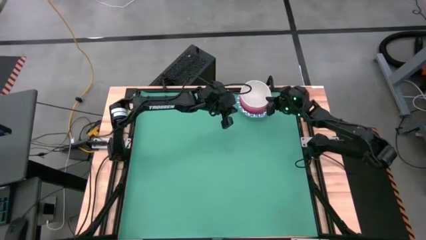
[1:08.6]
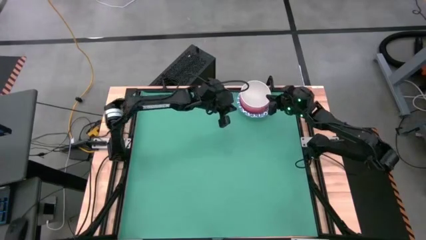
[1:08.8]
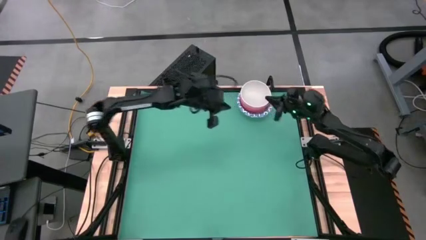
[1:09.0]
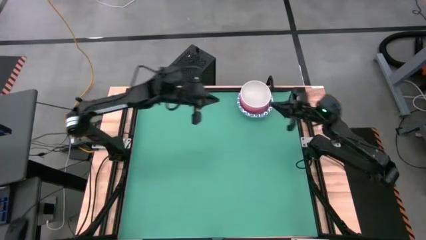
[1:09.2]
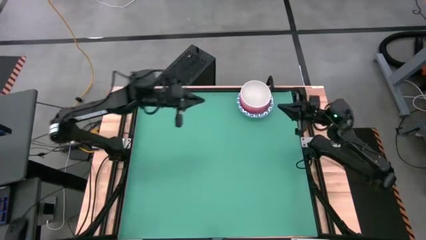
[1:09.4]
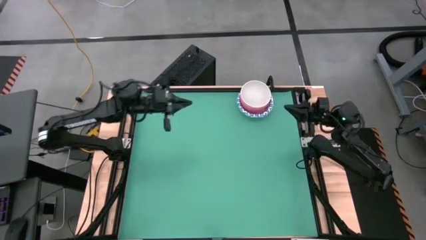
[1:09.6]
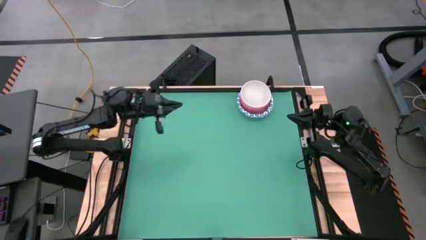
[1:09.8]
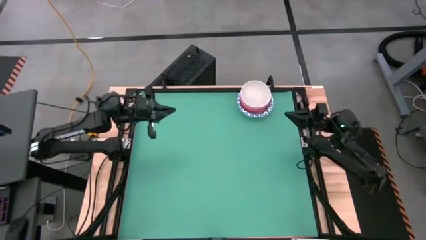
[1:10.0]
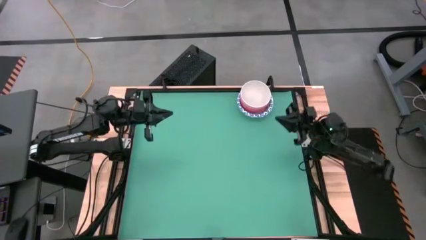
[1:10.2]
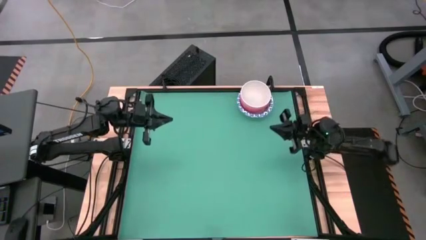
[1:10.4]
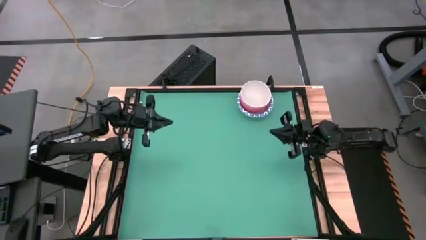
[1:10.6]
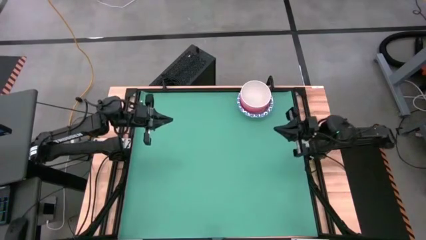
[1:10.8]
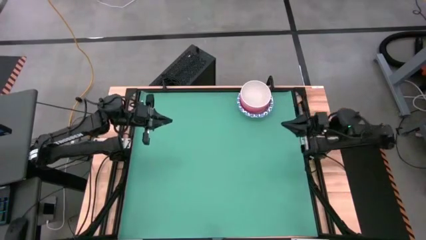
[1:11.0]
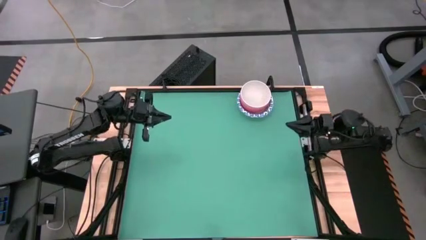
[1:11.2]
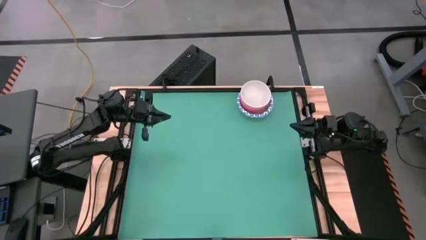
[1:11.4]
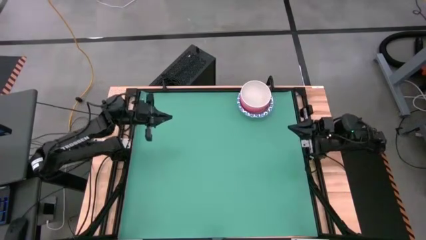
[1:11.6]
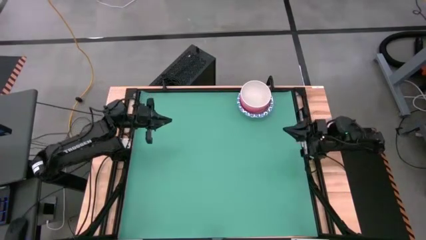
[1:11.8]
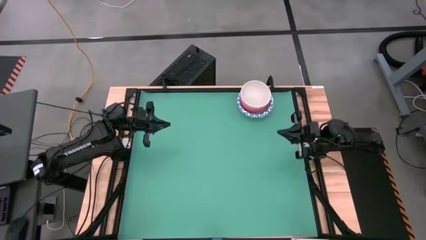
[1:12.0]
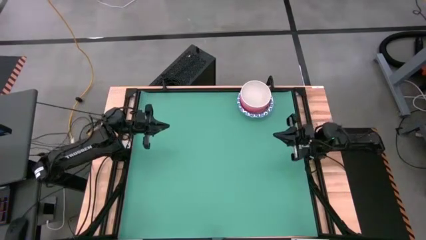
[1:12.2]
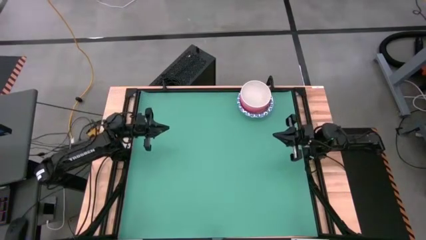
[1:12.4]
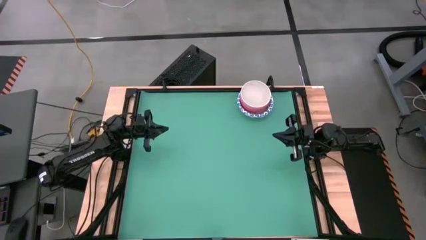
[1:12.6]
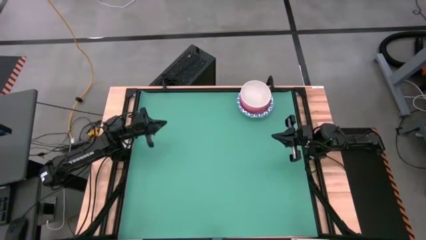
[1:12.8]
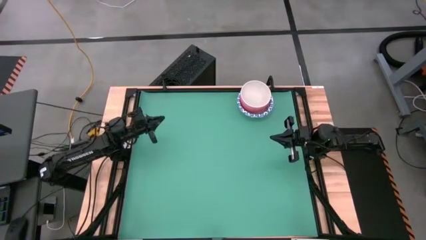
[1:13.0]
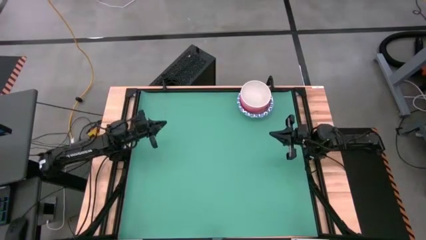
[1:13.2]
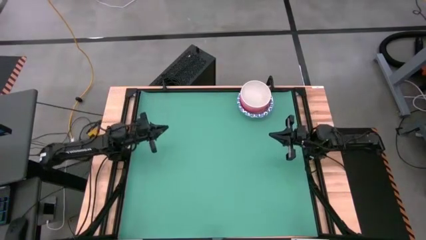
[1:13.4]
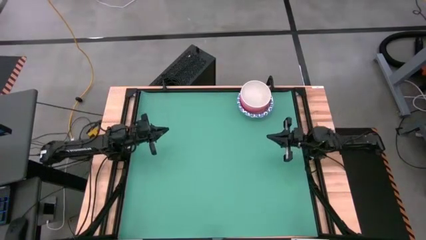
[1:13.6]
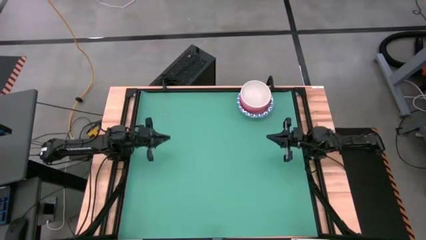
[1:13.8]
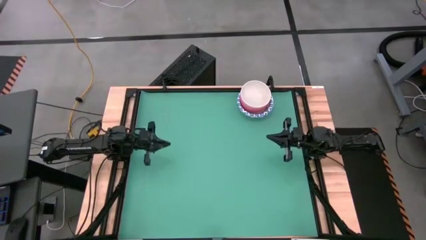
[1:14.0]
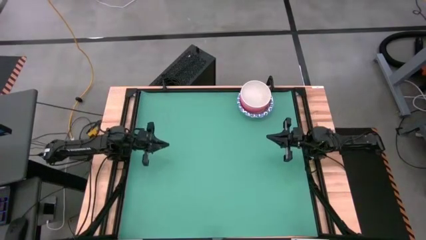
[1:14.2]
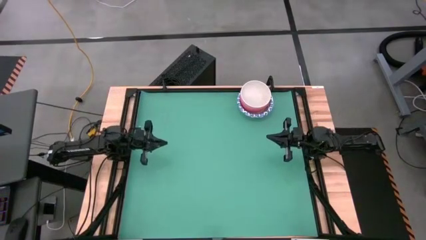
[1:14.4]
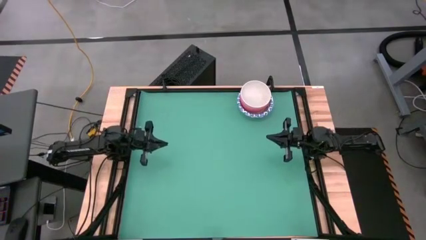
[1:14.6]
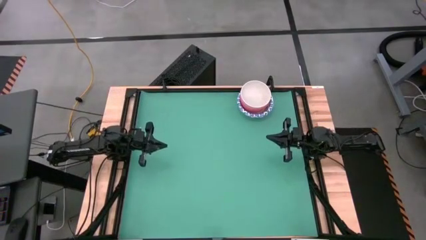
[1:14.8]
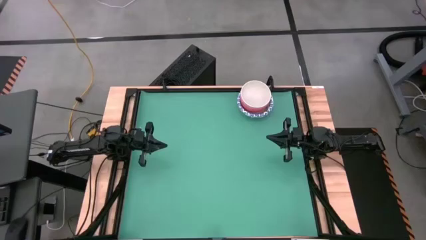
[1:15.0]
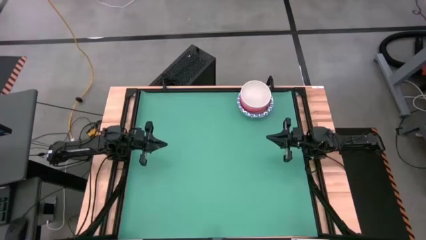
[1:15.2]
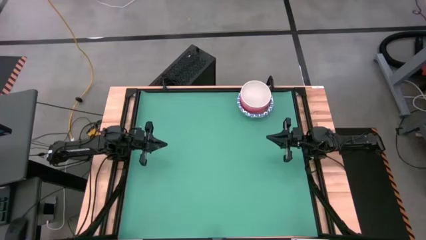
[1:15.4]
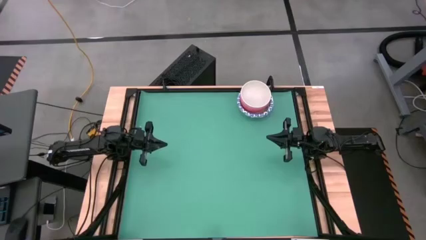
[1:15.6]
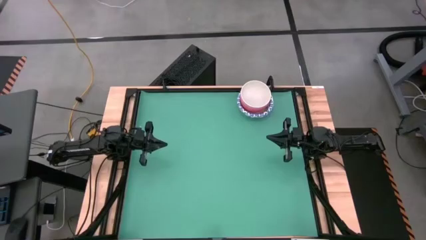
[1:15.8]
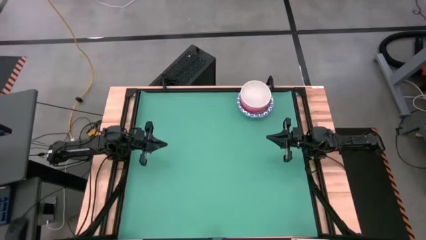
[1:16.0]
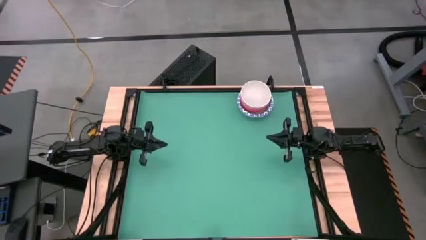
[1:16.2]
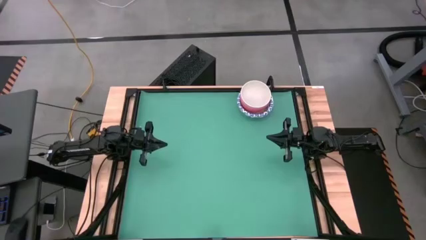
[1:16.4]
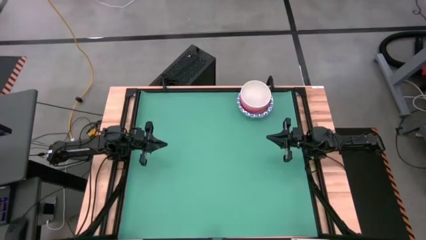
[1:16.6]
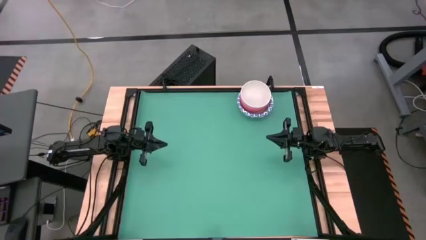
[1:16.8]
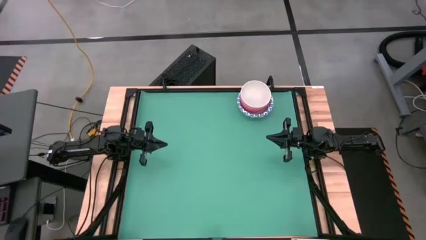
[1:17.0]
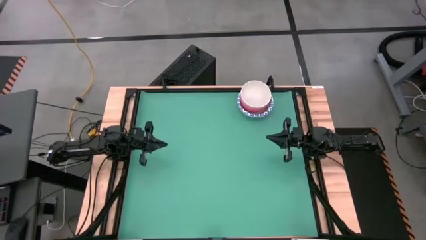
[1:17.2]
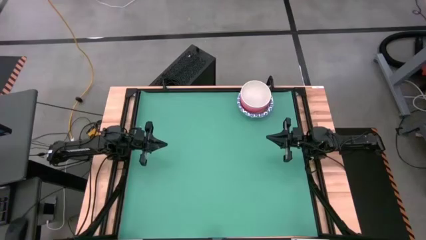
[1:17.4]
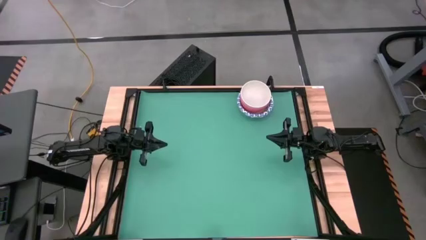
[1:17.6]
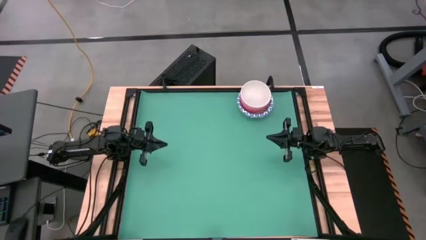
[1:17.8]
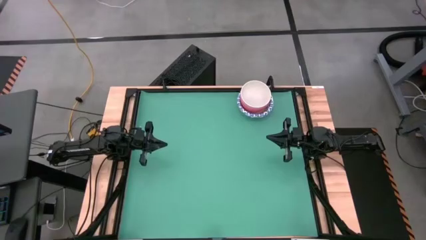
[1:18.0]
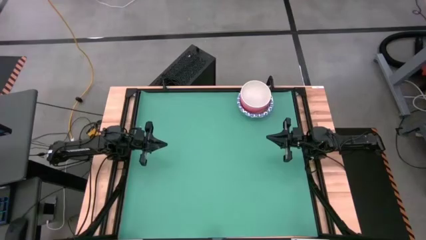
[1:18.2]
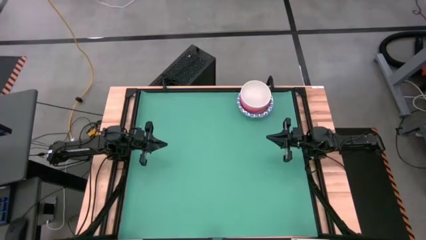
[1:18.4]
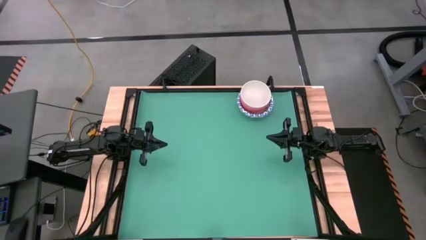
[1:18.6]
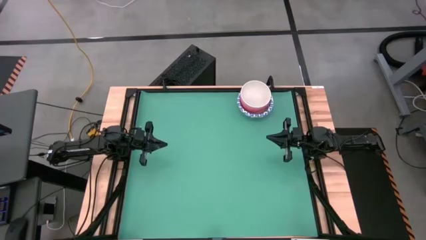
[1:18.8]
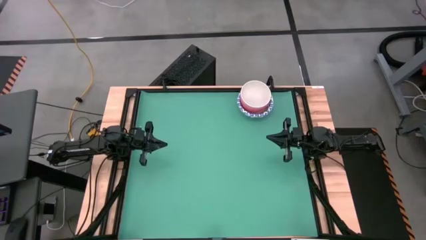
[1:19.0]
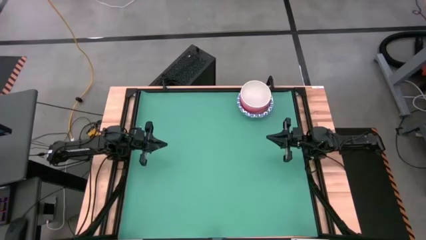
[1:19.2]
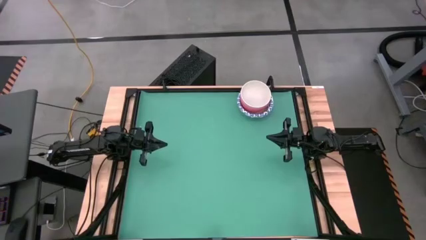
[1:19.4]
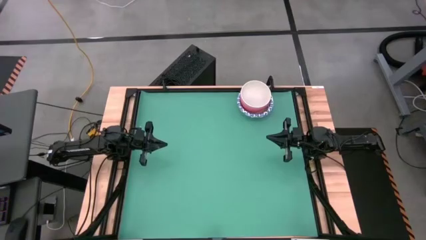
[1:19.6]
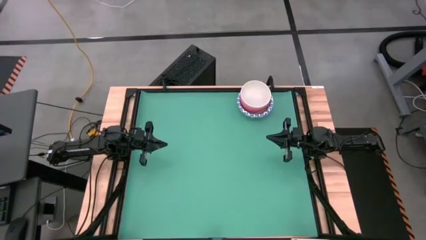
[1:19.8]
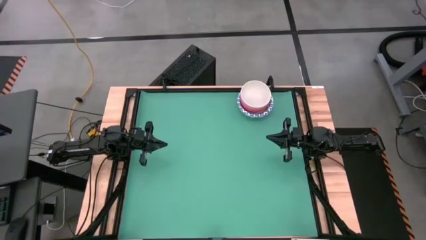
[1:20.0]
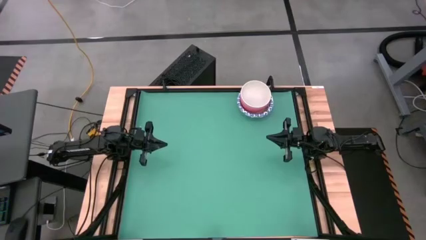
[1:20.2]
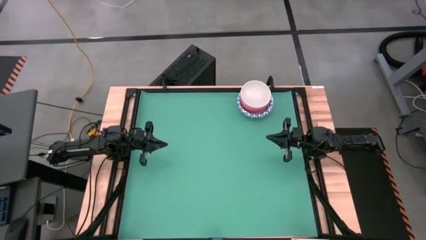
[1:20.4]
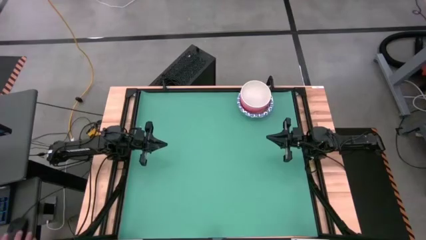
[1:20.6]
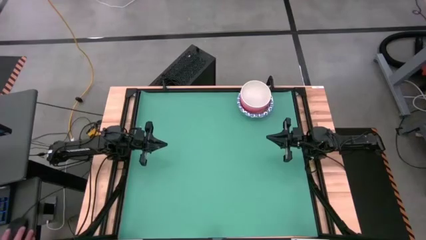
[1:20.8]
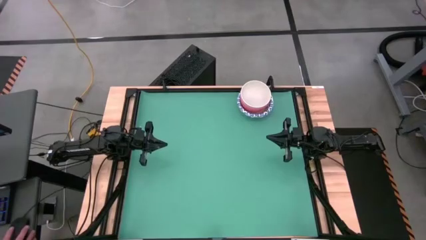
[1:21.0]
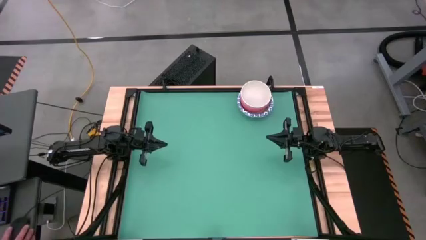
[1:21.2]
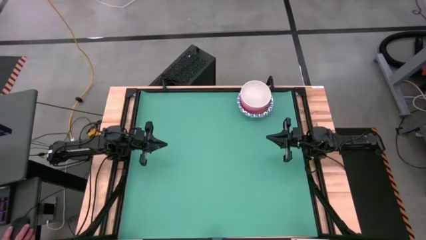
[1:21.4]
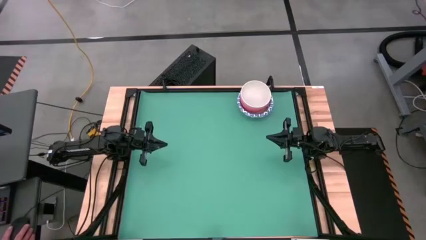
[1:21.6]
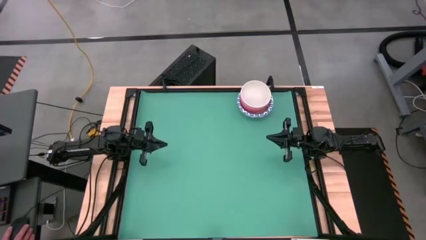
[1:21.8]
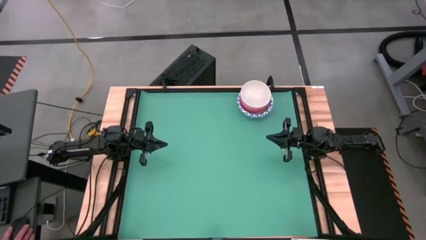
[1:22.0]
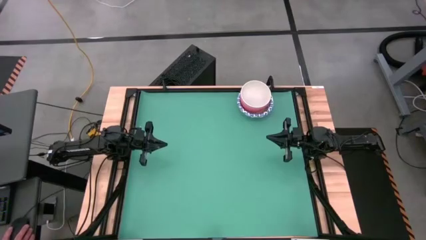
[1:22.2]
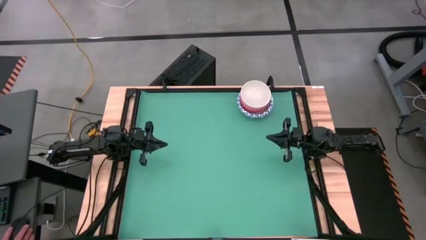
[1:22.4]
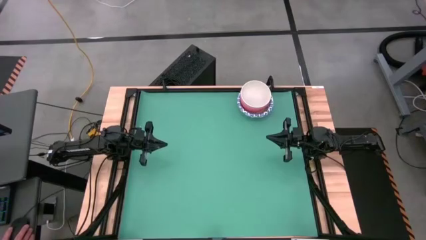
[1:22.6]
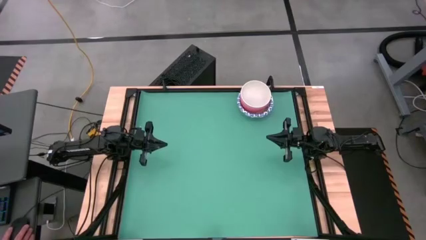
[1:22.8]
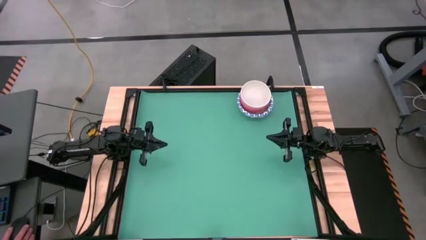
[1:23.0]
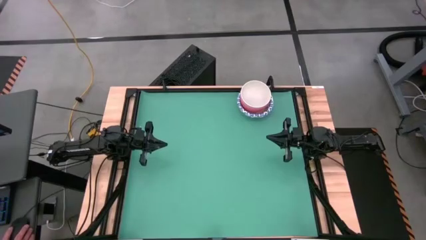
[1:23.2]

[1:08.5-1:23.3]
Task: Nest bowls inside each other by size order
Return to Home Position

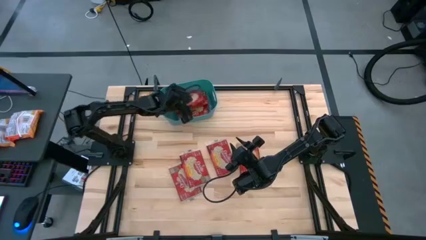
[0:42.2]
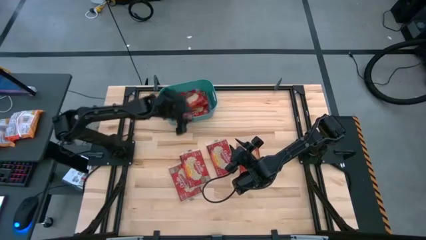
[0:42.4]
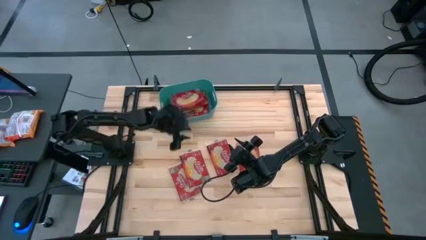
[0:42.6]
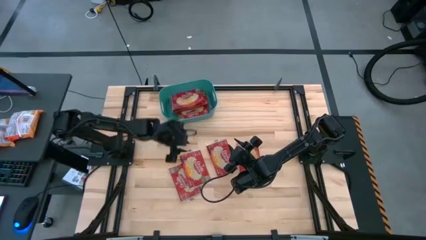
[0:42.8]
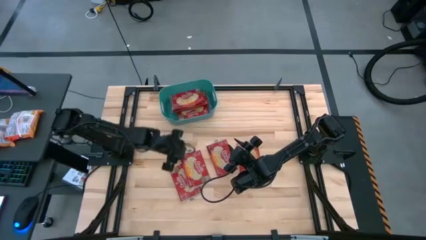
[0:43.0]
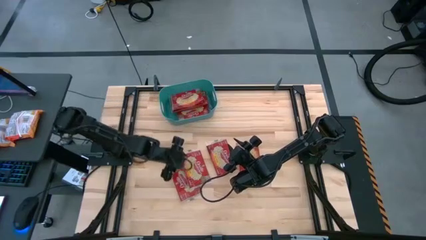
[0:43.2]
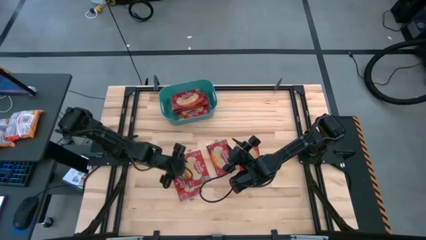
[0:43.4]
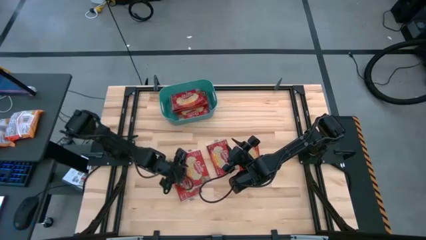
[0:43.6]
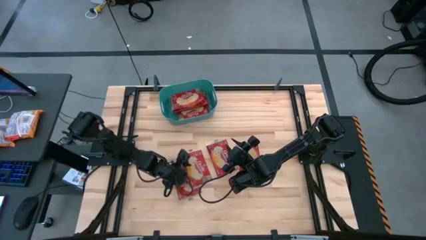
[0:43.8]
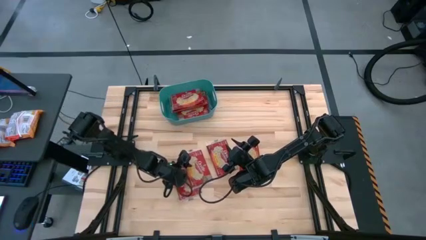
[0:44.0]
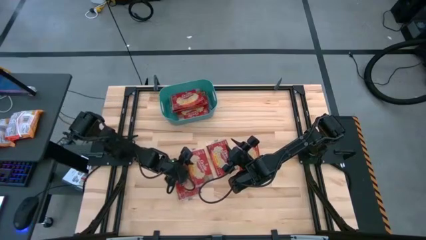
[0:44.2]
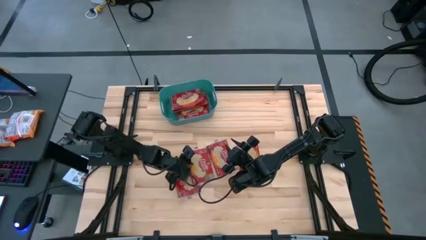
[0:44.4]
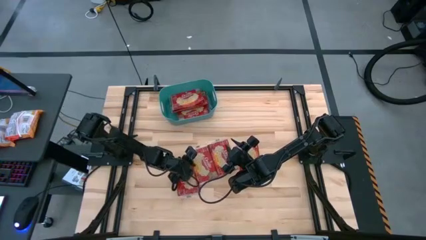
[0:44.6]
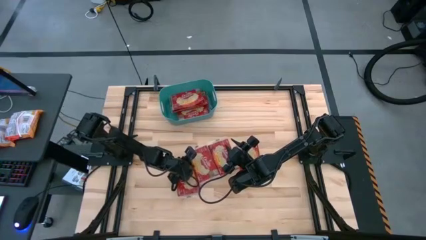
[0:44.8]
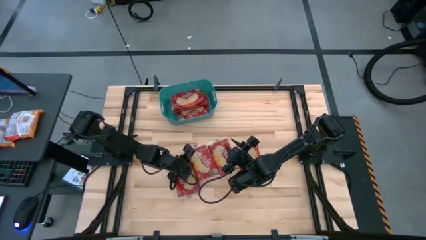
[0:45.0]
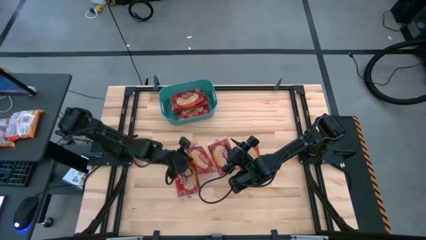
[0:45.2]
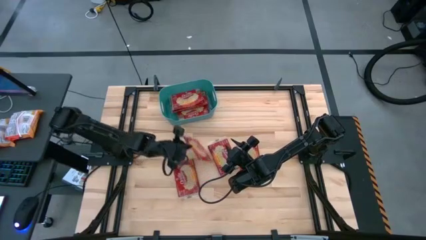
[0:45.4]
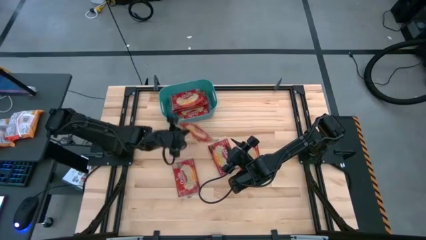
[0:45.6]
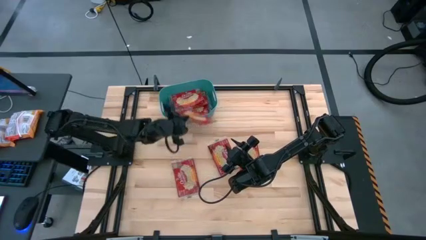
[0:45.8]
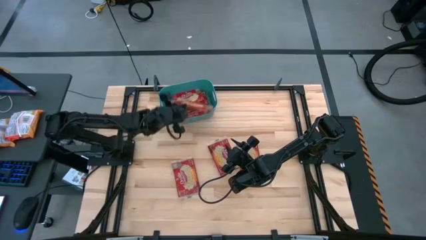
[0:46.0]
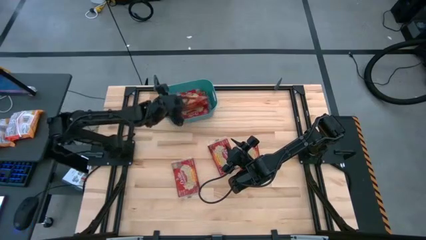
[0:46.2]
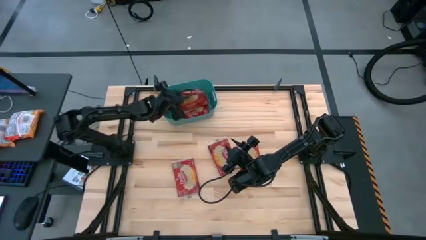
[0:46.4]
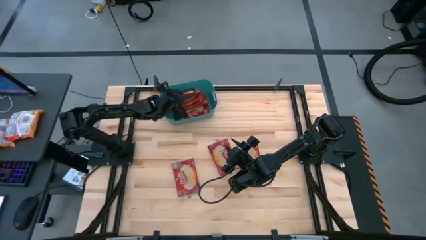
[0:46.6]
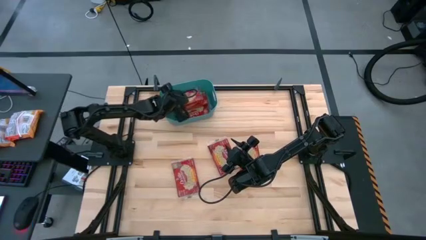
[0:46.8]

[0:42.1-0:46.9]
Task: Sort popcorn bags into baskets
Put the red popcorn bag into the blue container
